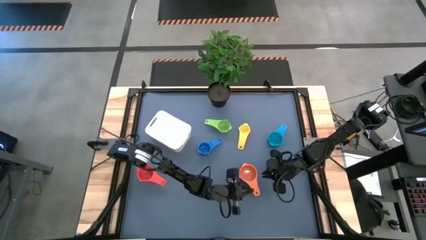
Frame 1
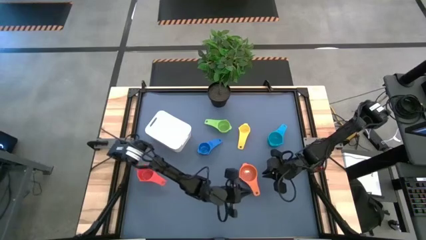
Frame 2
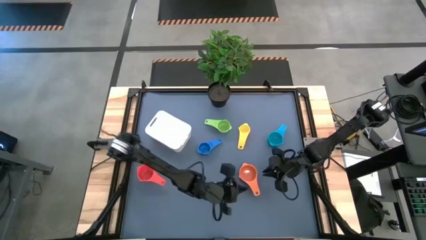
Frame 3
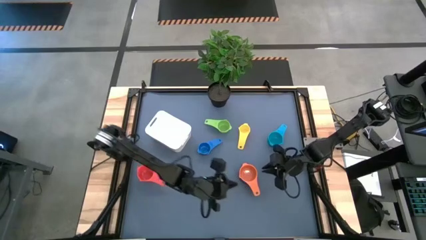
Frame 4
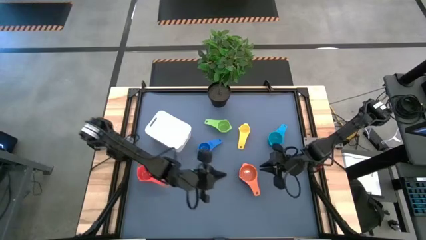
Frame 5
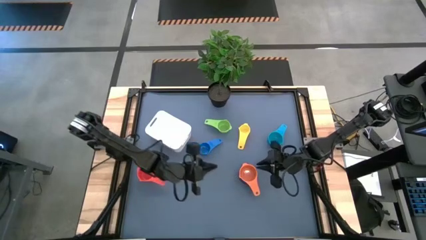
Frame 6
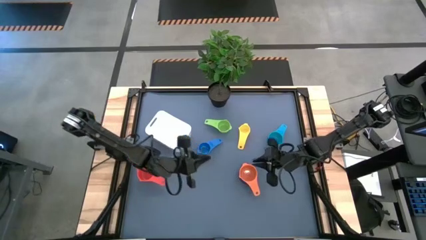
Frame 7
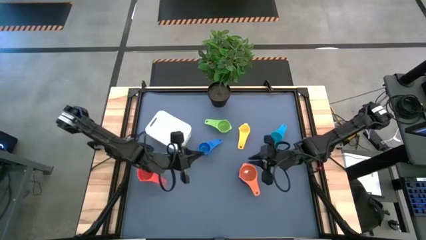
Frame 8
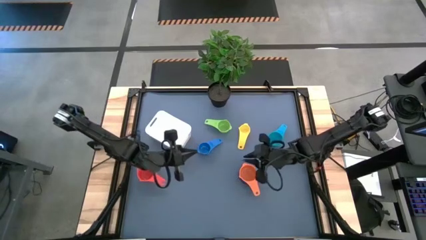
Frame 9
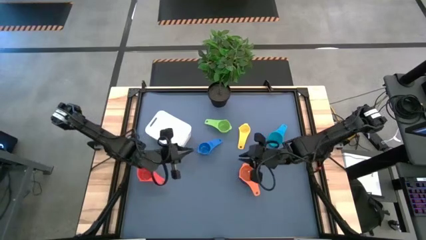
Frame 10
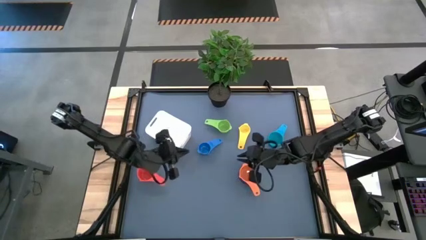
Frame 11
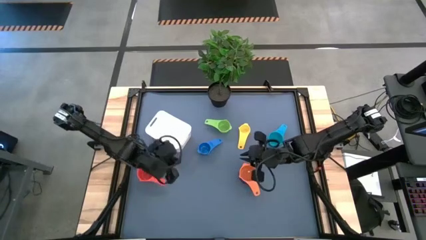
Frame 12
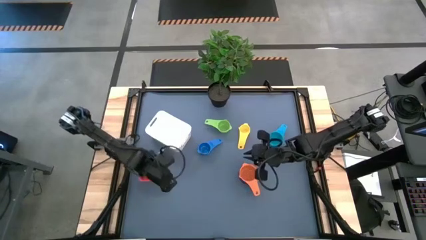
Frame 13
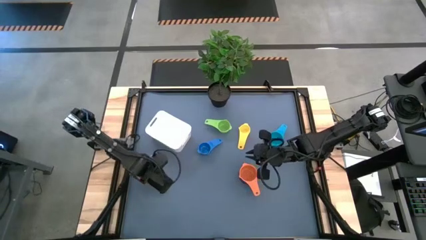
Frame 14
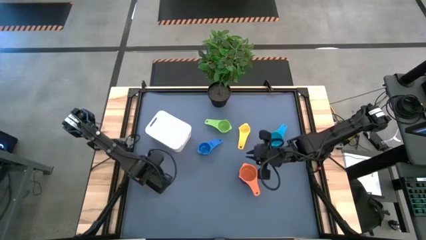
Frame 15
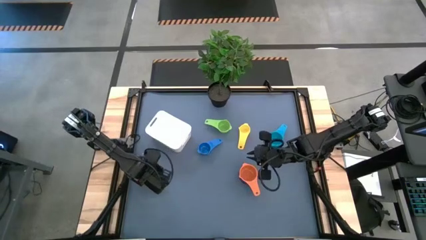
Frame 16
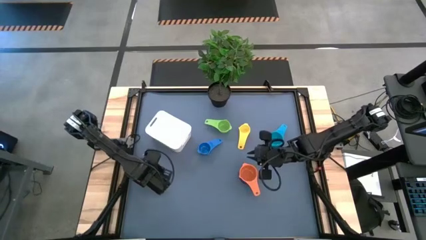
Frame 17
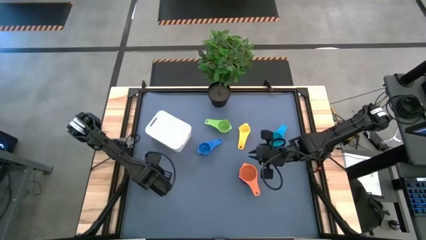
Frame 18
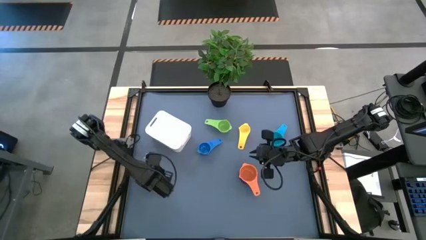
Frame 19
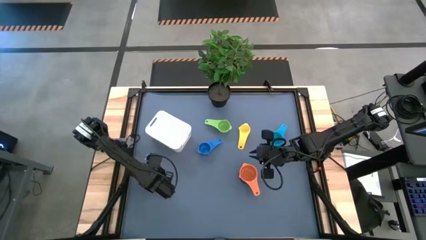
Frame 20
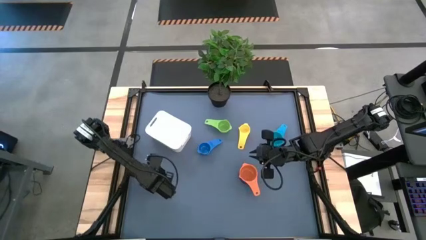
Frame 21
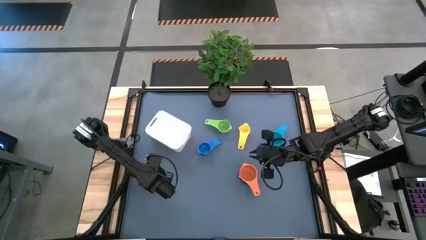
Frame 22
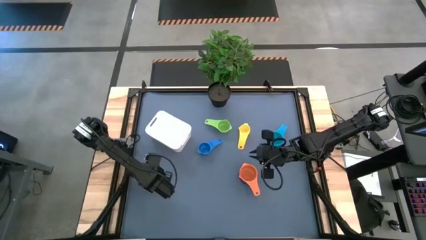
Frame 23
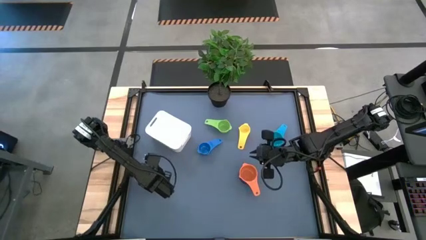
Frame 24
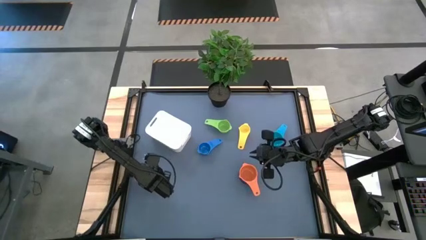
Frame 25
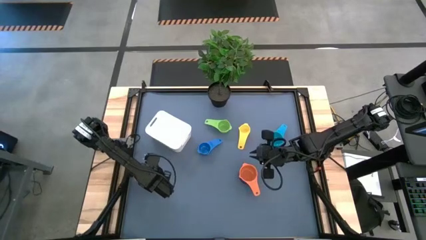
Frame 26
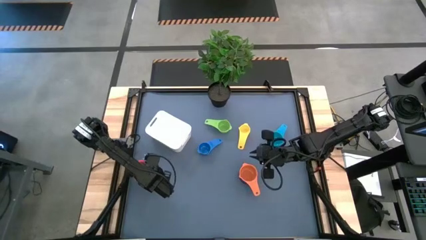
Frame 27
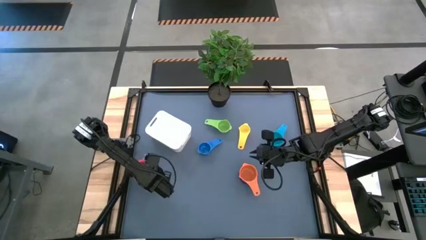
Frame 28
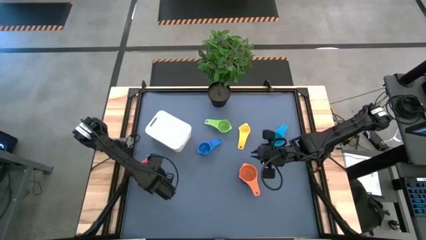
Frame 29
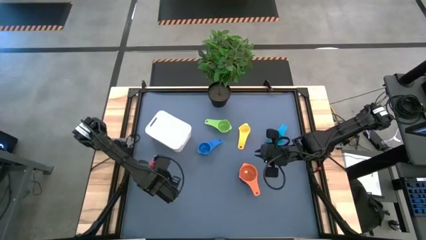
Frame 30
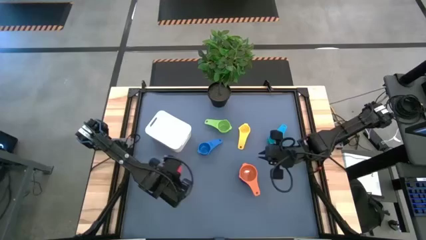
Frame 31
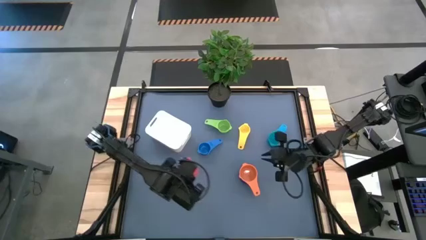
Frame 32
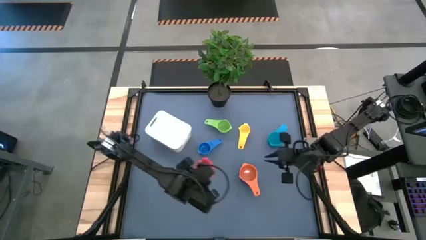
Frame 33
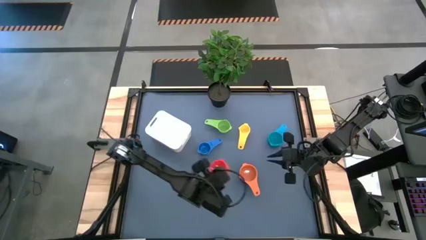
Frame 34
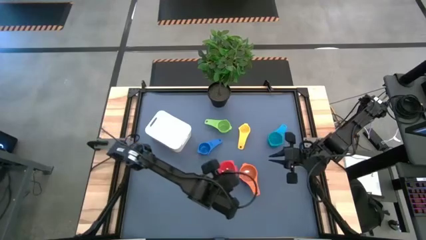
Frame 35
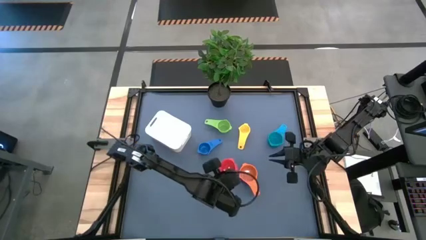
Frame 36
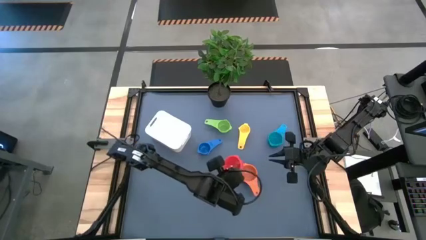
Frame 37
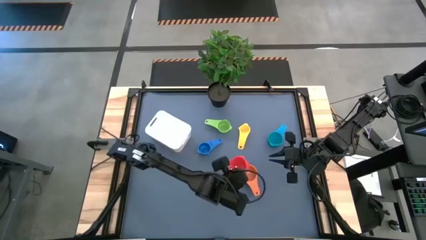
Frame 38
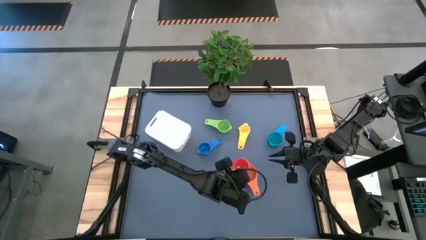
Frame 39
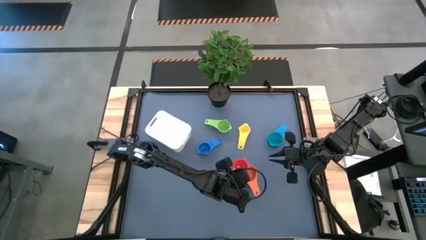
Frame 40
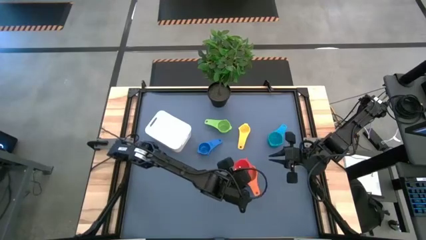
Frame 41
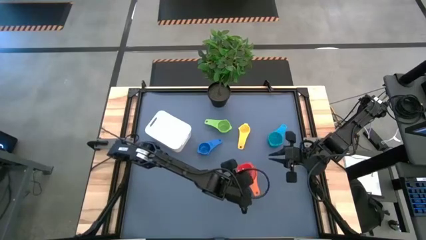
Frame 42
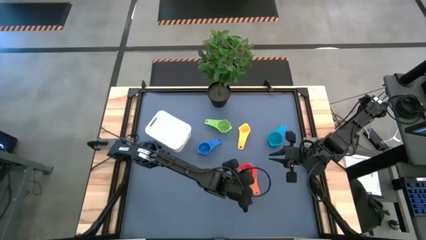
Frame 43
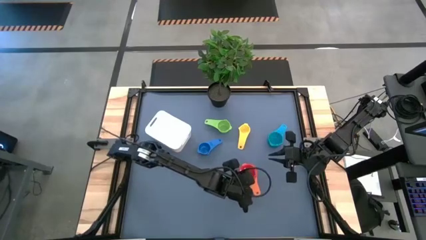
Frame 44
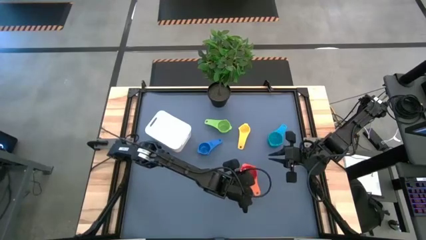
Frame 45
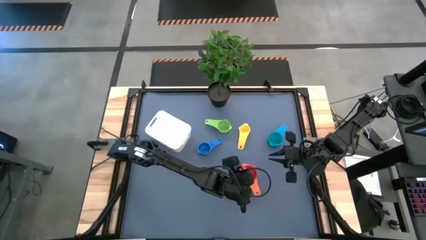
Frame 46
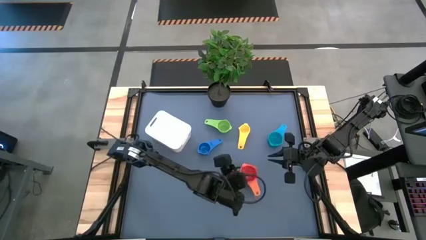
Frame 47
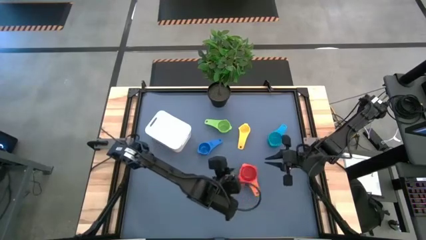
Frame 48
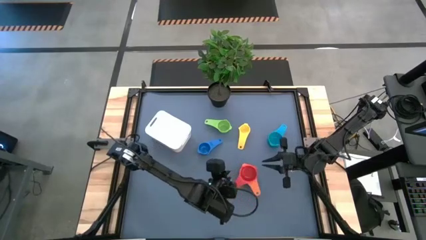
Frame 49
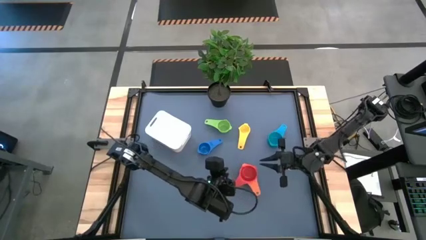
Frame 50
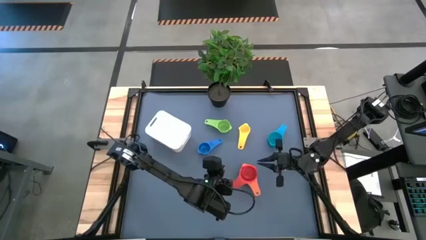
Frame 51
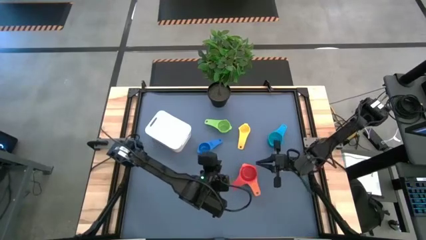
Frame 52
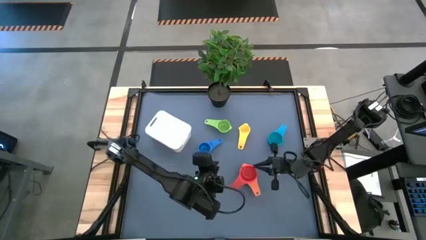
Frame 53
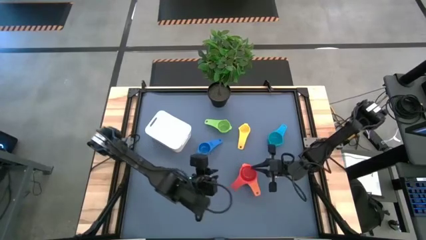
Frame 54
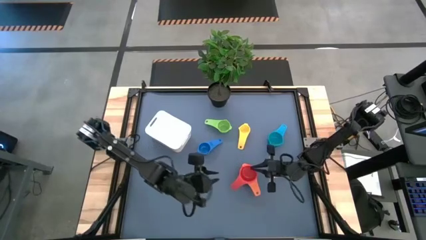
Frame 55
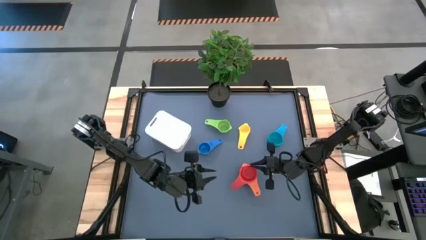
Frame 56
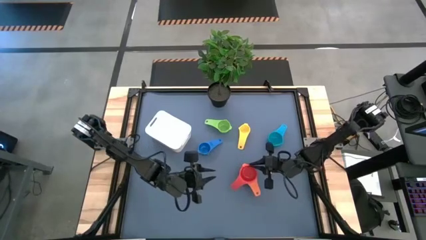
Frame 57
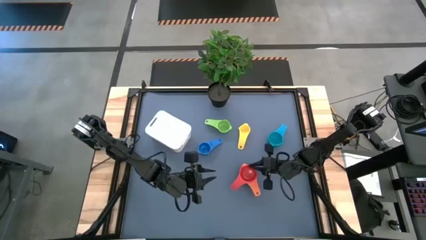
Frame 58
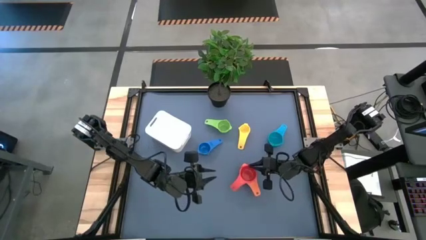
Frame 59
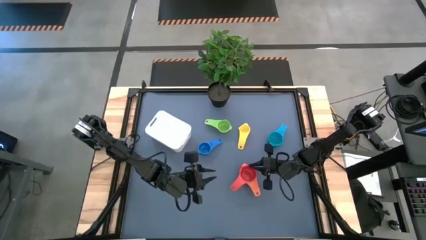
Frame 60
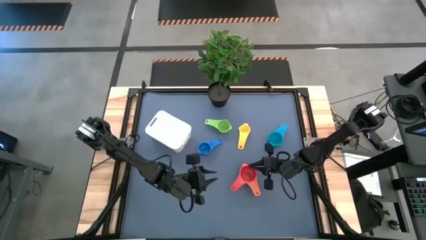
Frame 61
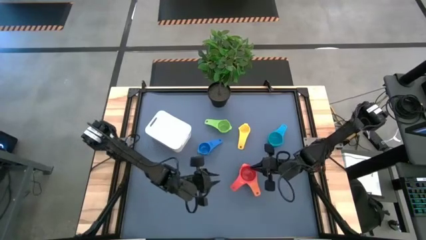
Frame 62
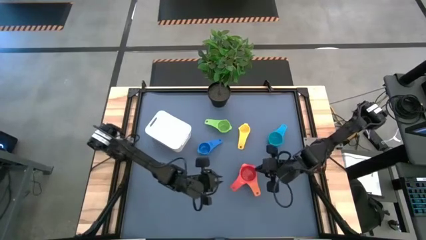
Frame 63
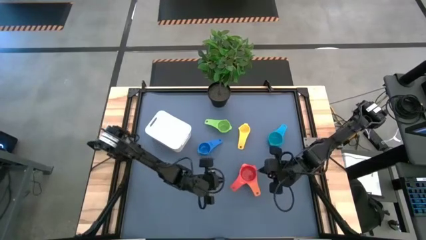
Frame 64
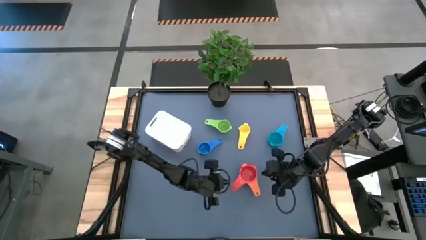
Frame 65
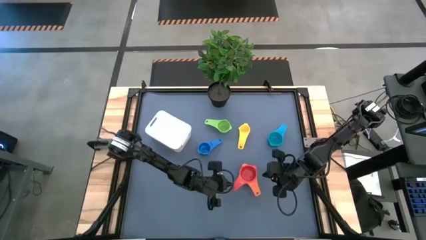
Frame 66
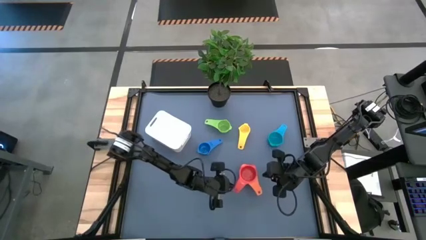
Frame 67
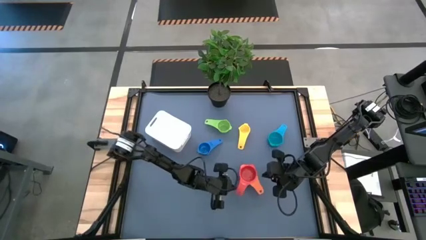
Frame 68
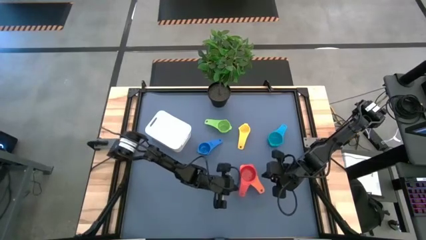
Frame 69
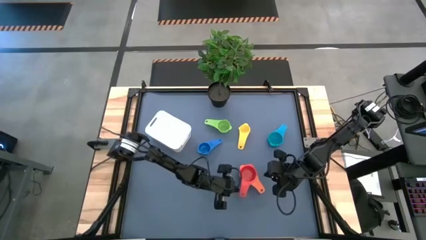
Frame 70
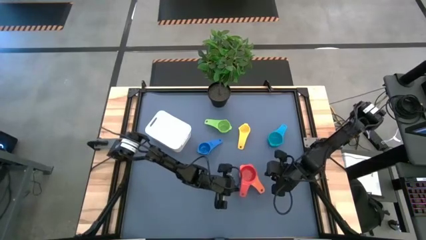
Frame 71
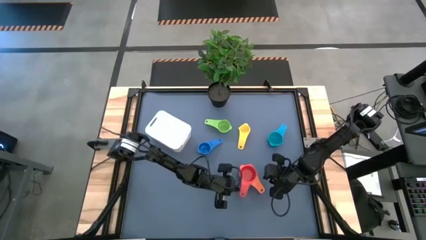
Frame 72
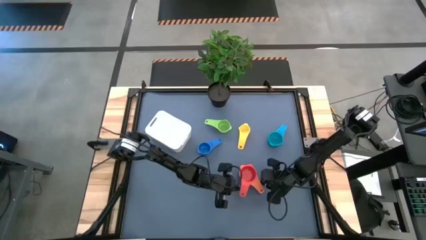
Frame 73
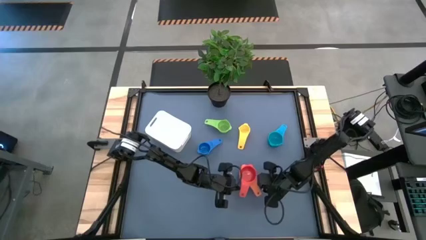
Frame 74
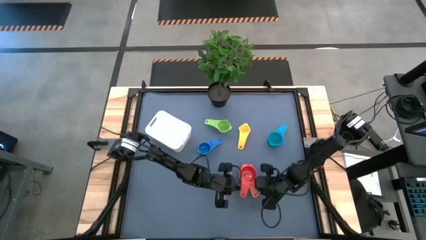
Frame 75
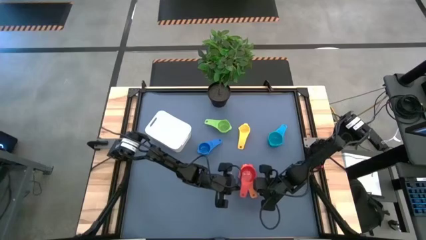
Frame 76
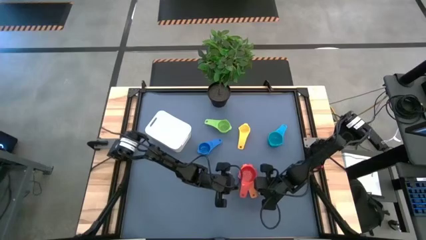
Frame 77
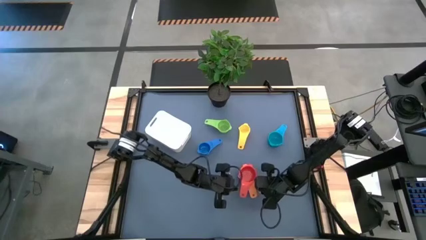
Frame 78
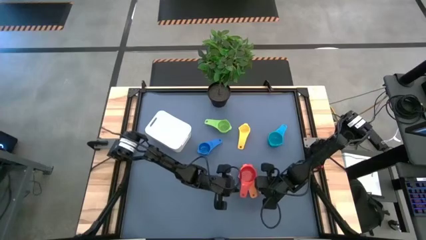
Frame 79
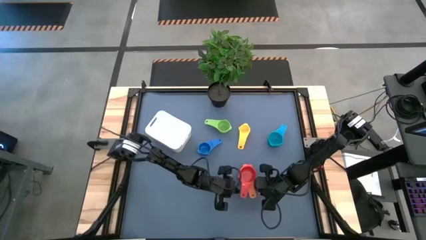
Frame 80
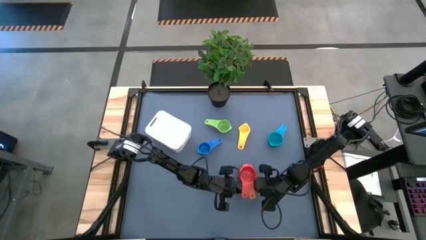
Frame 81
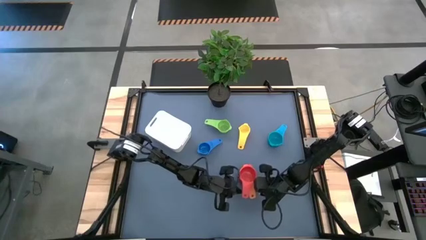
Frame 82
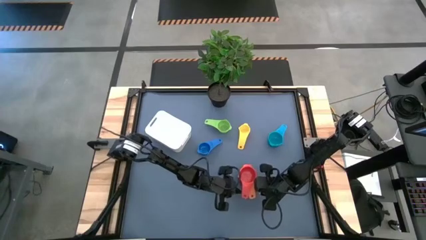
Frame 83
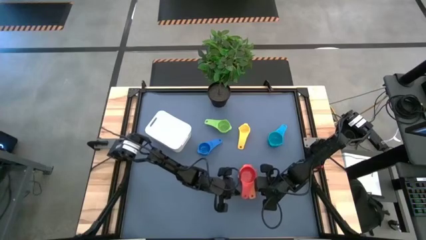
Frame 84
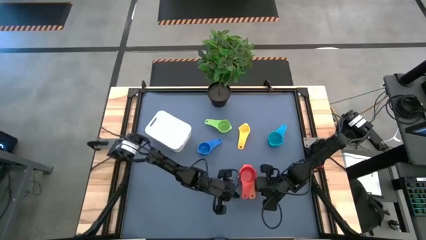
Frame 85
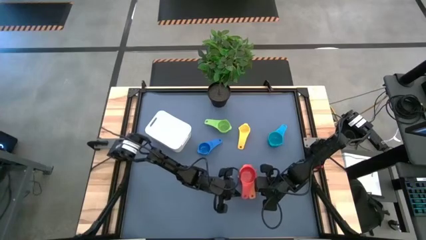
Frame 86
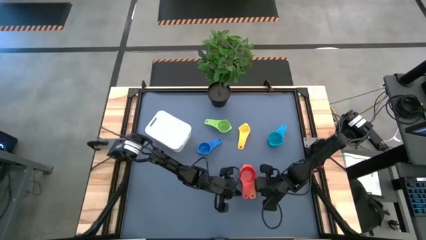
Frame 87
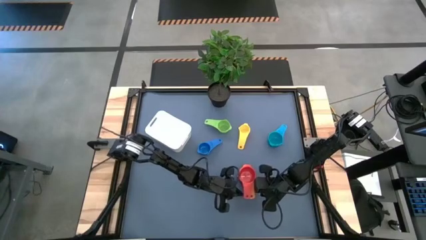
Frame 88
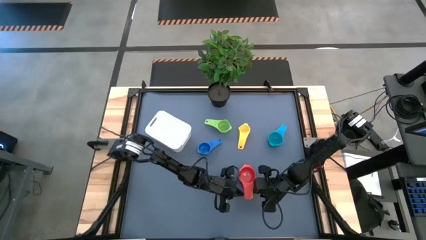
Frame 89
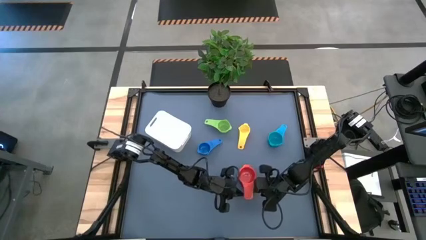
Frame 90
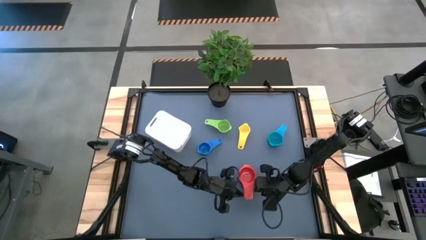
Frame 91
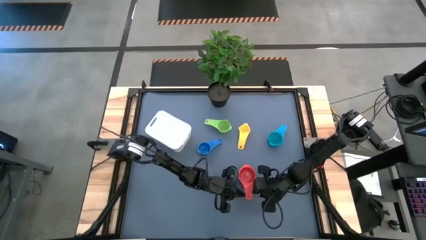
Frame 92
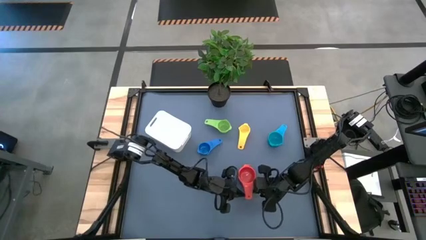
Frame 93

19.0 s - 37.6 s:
Task: Nest measuring cups in basket
Stack the red measuring cup on the orange measuring cup
